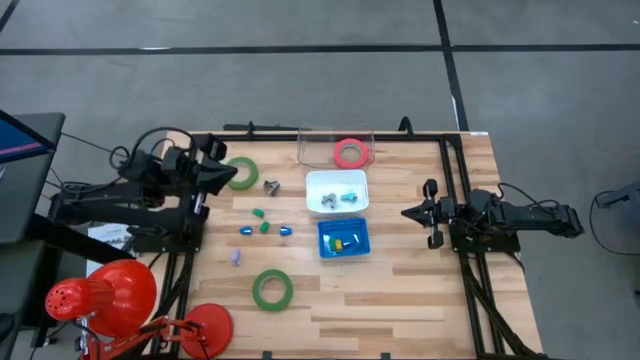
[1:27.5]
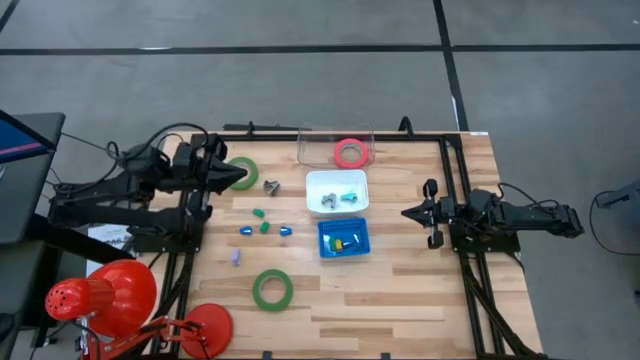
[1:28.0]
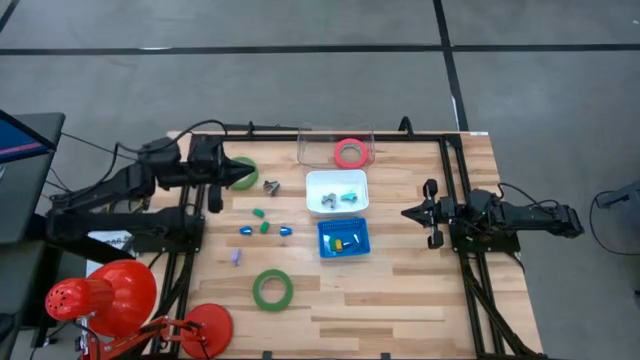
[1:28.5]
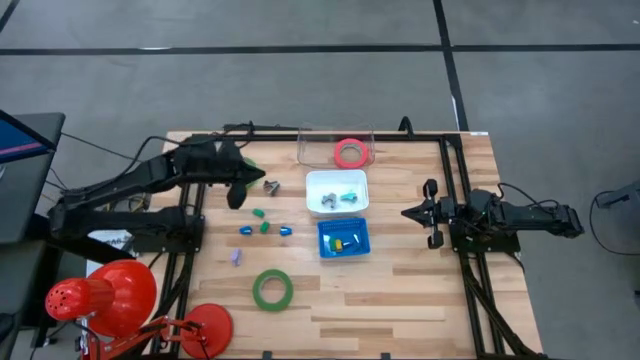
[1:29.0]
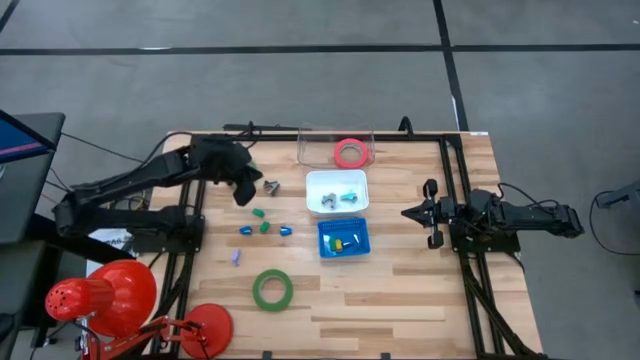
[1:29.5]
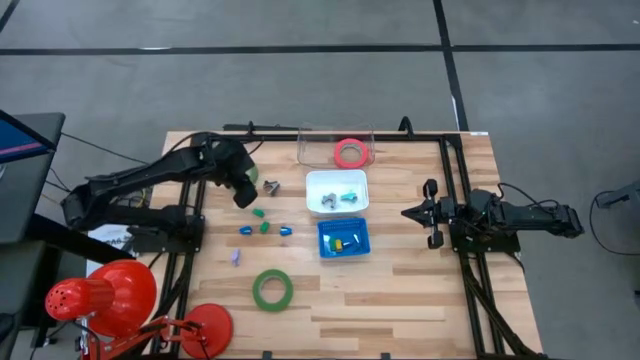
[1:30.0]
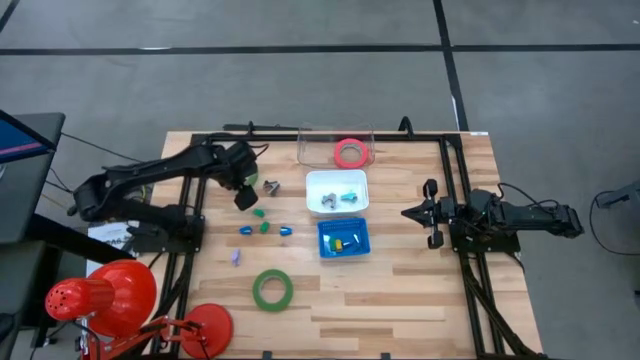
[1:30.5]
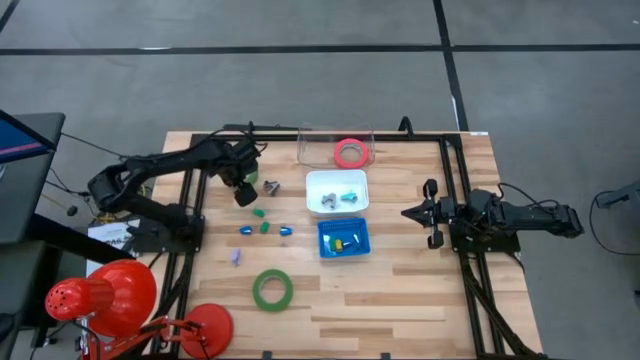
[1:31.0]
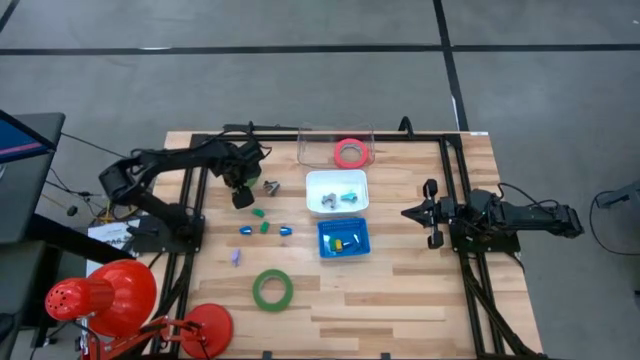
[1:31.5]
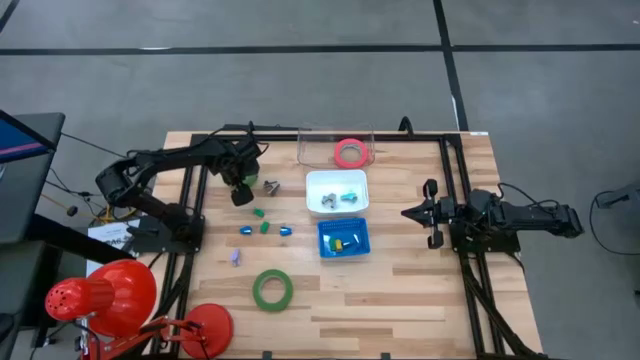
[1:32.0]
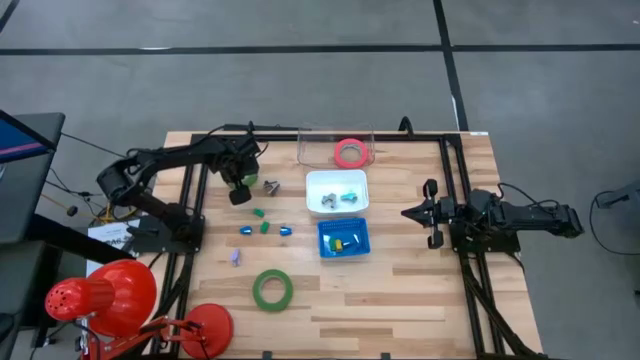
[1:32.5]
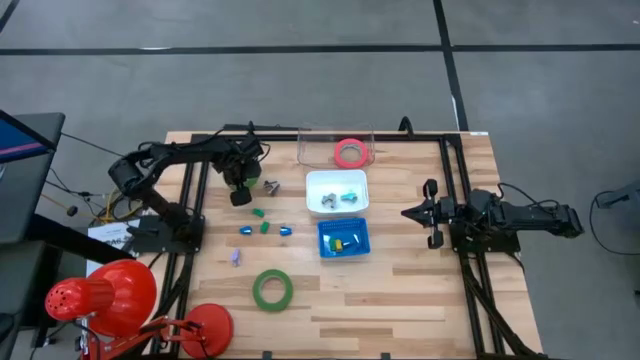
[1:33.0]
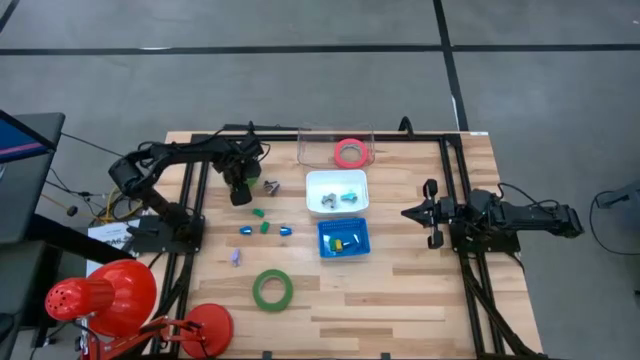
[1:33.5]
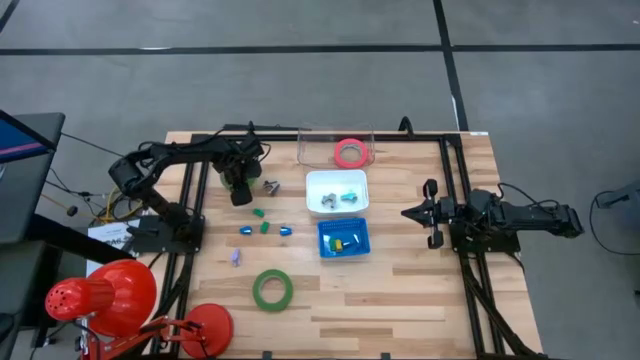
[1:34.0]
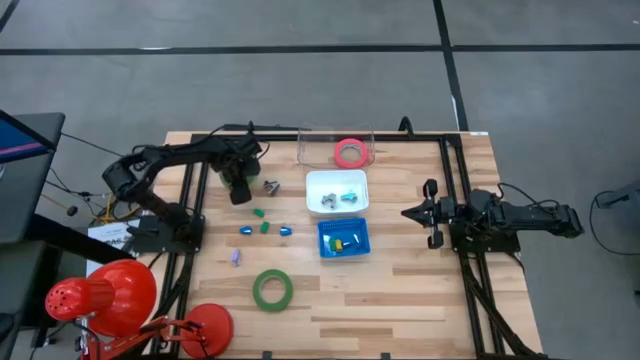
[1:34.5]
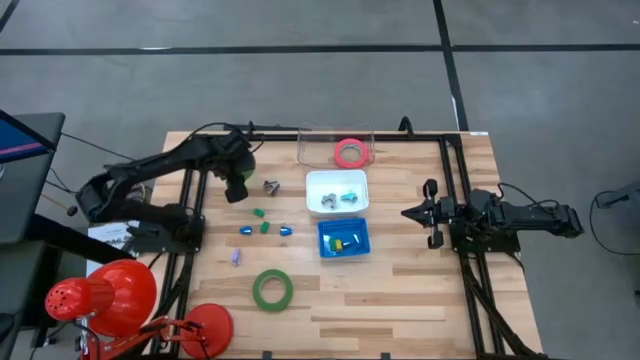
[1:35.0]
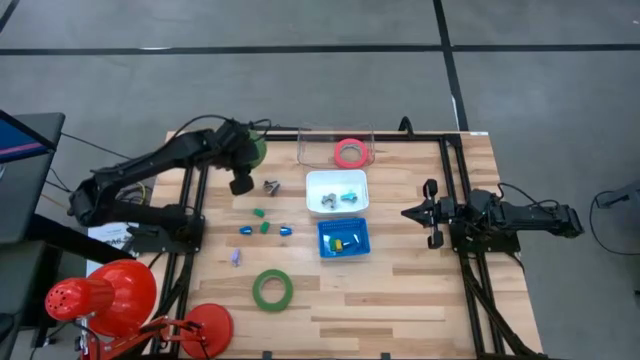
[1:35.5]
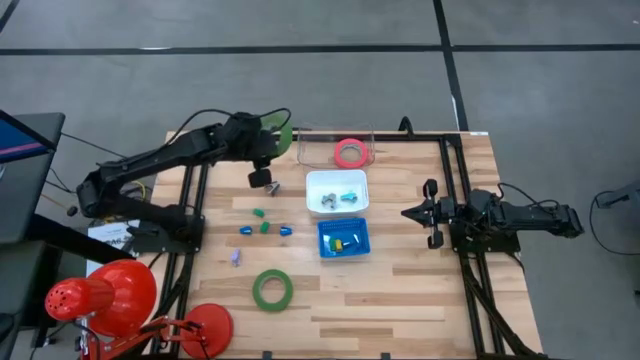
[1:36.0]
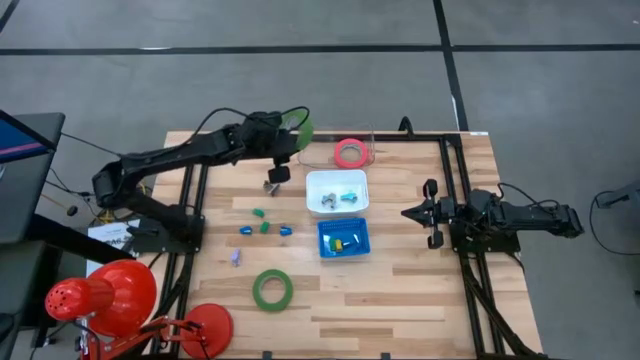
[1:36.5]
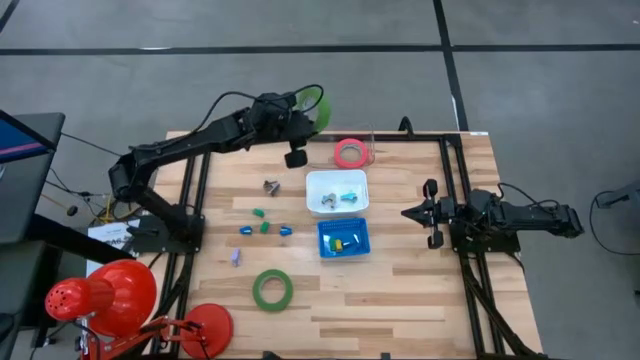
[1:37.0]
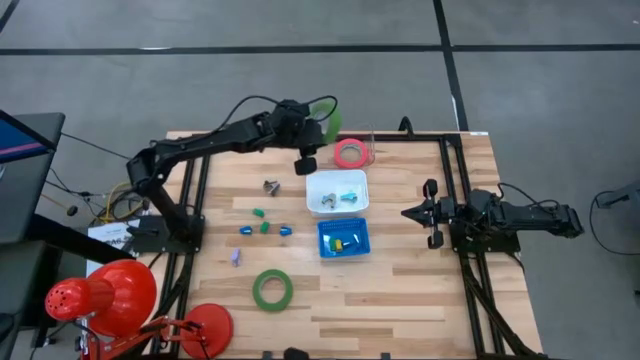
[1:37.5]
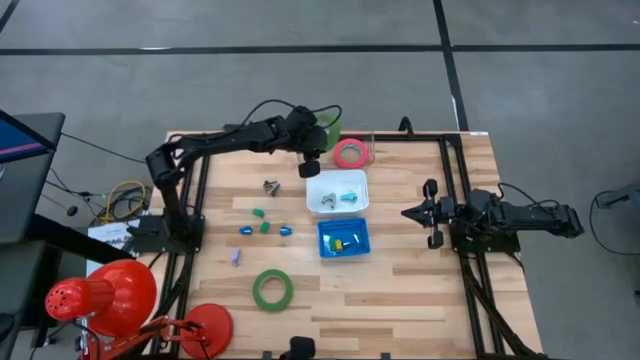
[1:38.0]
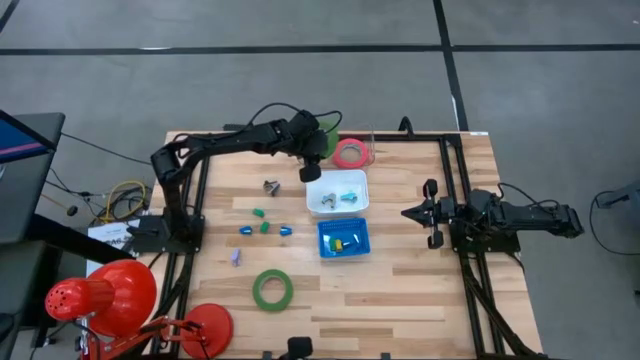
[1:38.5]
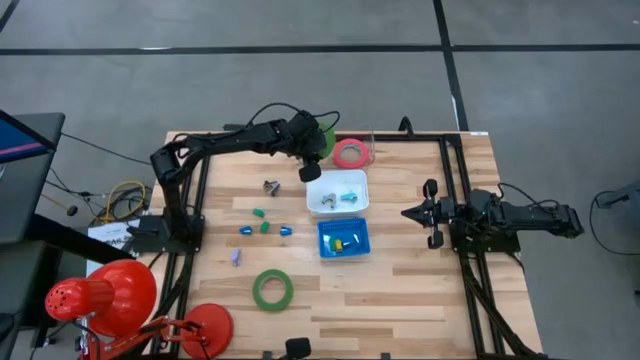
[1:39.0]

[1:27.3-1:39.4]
Task: Pick and place Stapler, Stapler remover, tape
Put the top green tape into the transparent bin

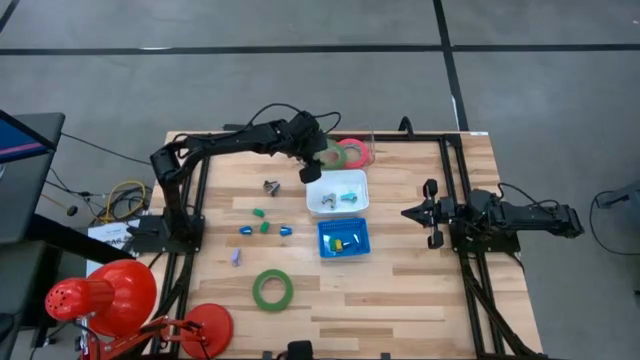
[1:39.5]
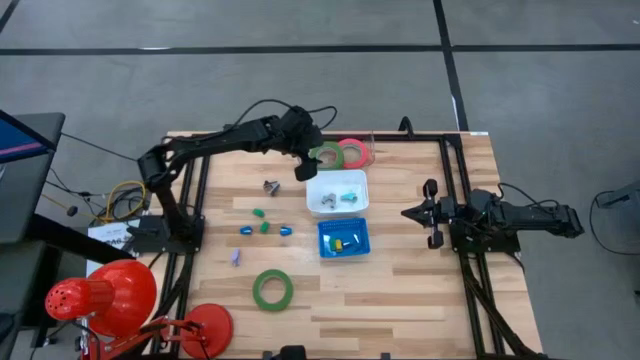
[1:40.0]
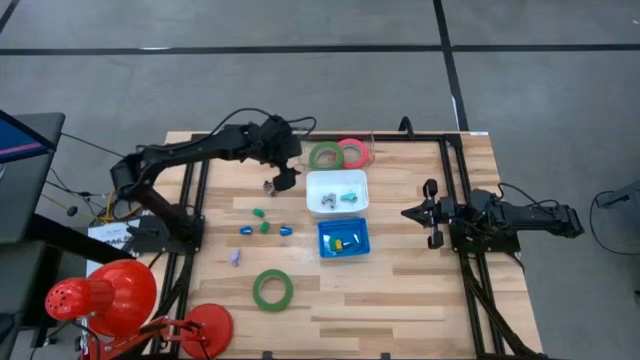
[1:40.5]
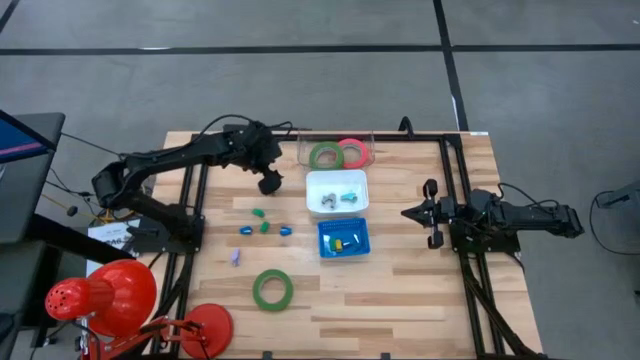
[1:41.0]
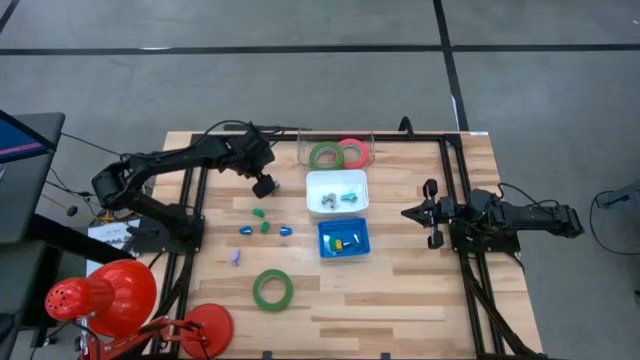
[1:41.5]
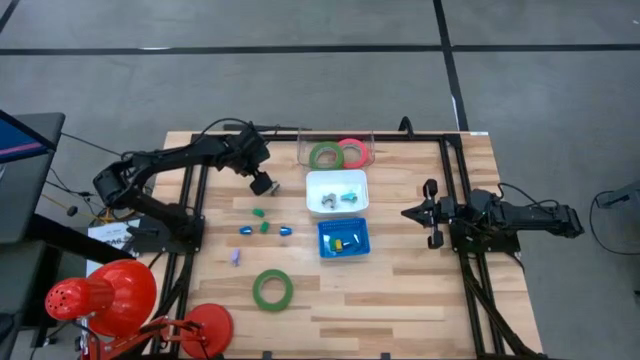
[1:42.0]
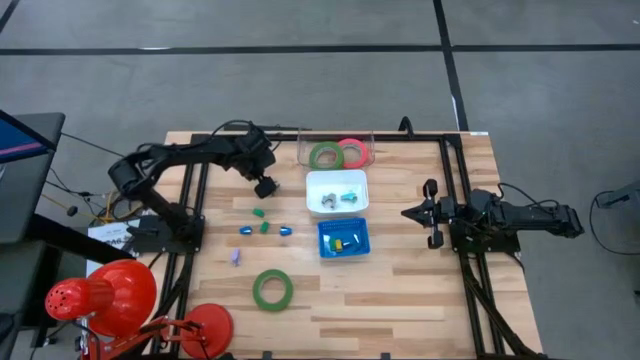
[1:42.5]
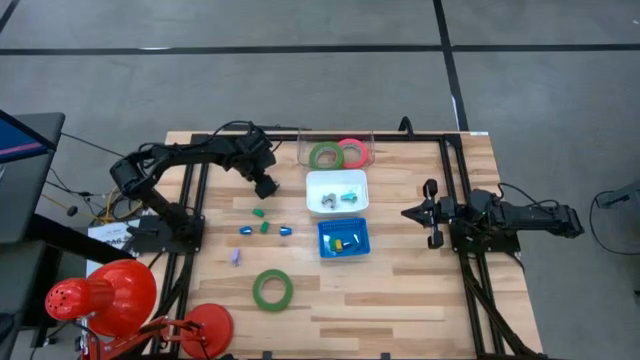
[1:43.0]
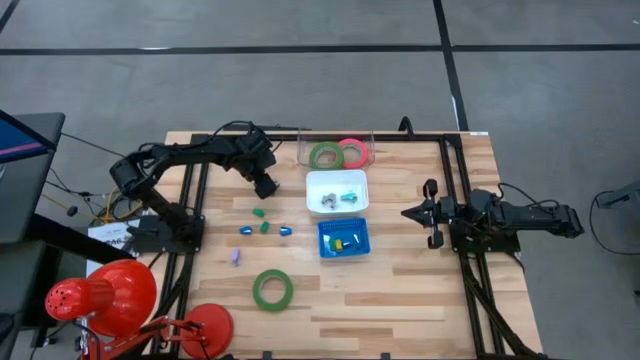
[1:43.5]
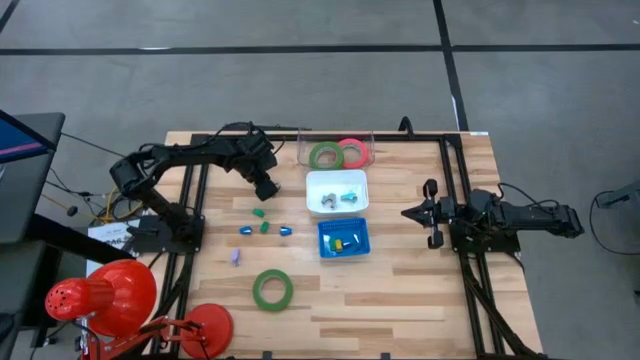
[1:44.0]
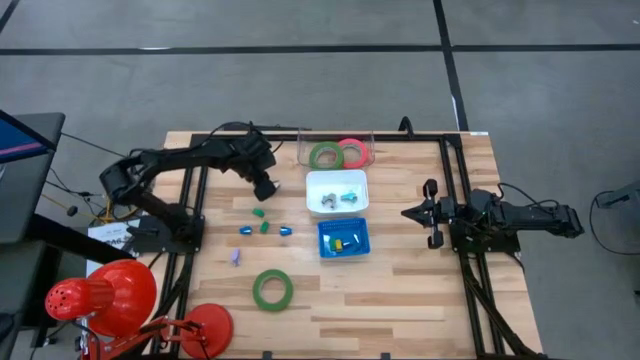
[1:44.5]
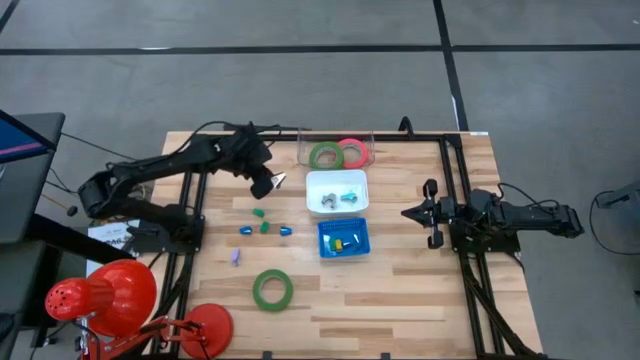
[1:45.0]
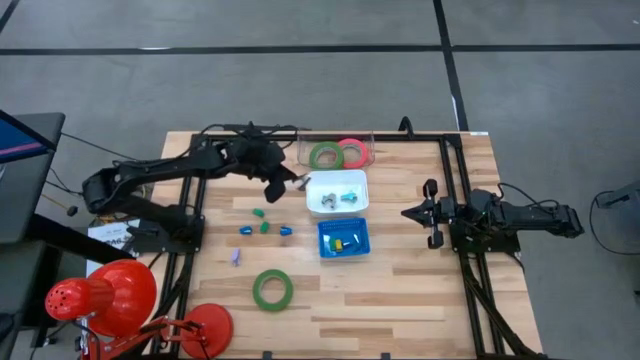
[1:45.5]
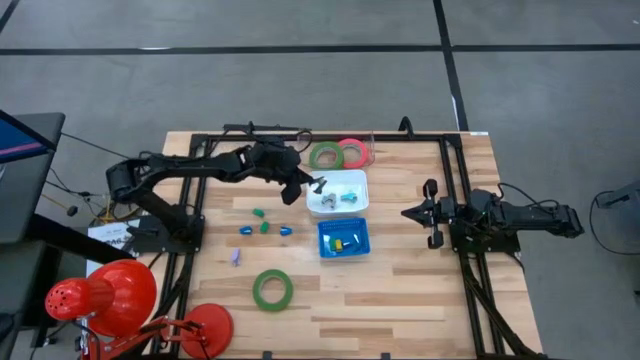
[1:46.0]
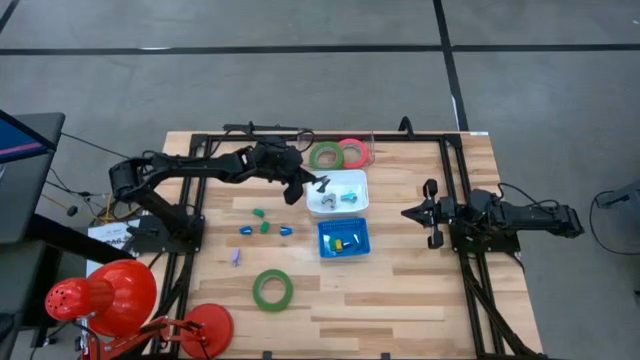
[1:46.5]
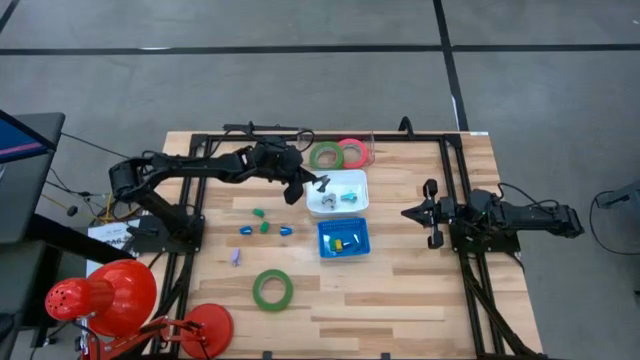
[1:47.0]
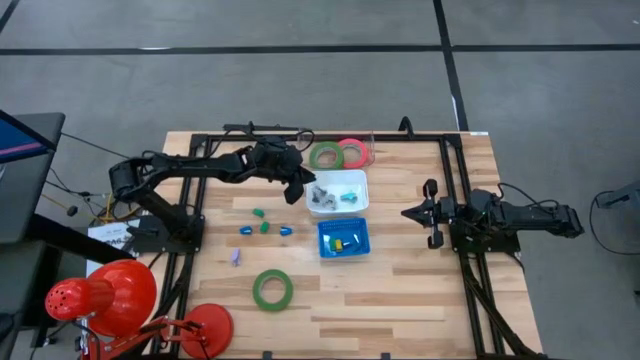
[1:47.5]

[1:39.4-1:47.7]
Put the black staple remover into the white bin

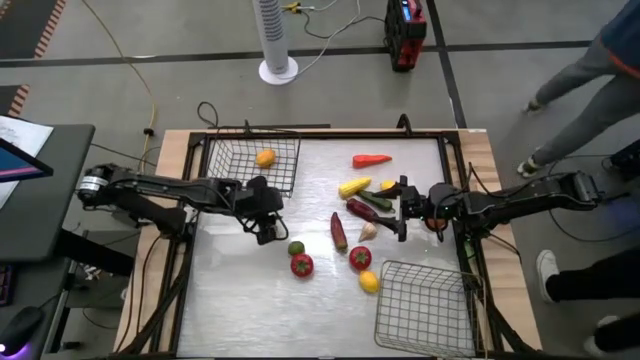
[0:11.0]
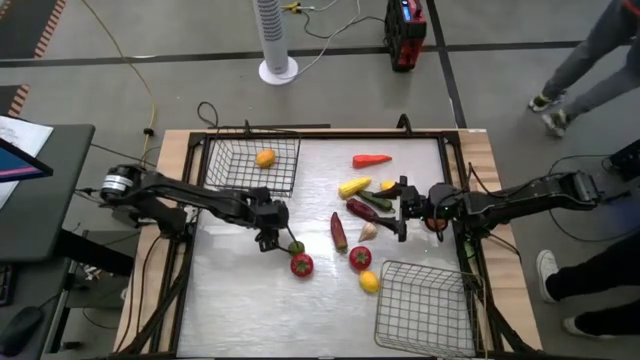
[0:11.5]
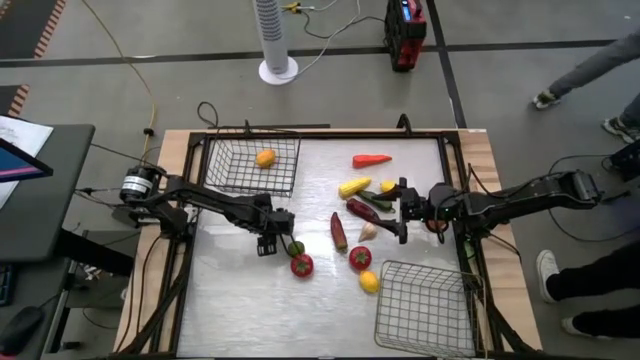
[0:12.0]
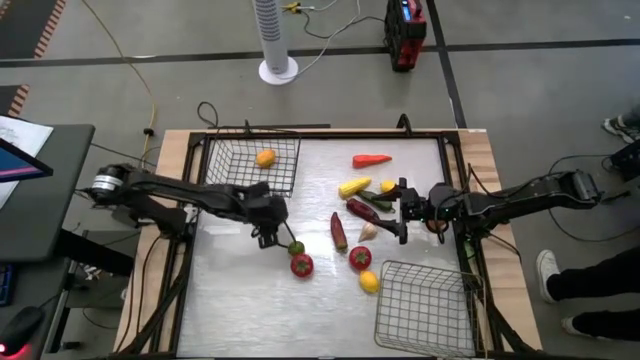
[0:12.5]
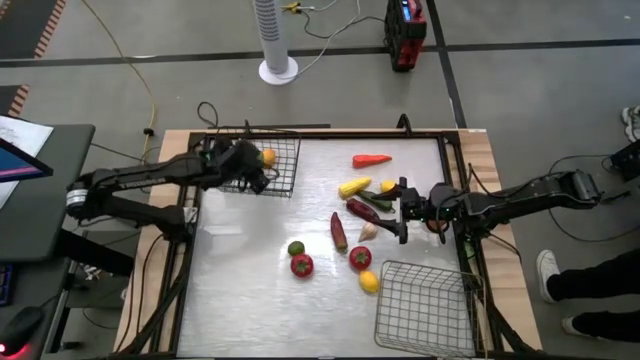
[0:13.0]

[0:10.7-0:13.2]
Task: Sort produce into baskets
Put the top lime into the black wire basket
